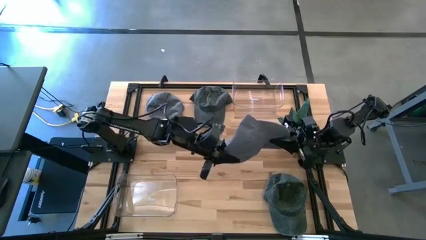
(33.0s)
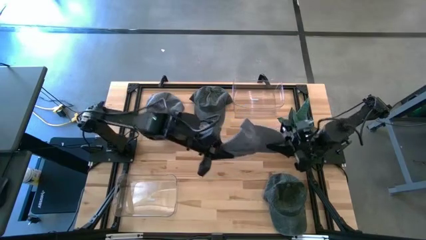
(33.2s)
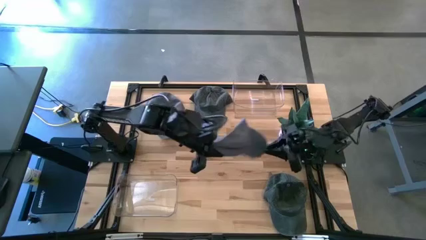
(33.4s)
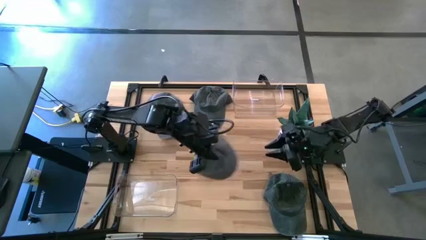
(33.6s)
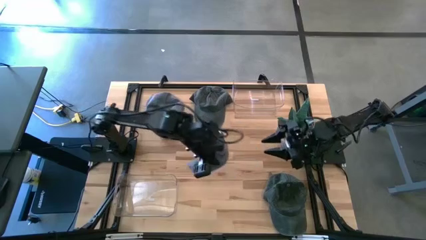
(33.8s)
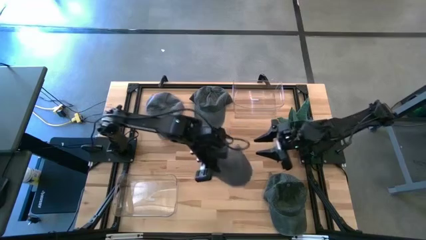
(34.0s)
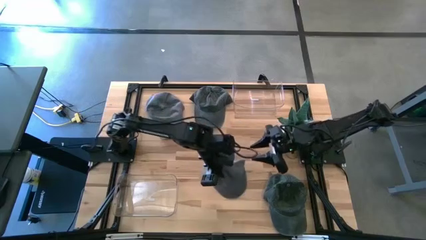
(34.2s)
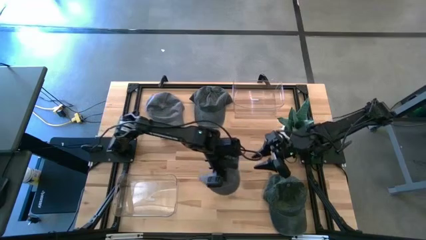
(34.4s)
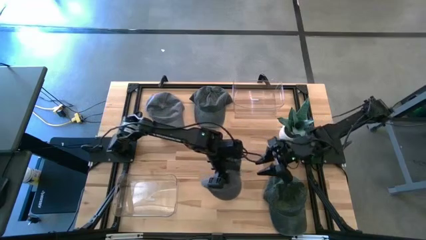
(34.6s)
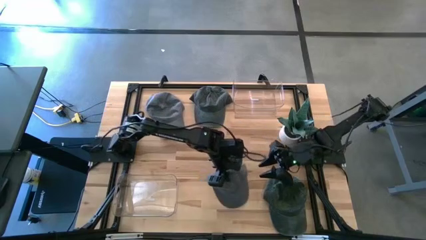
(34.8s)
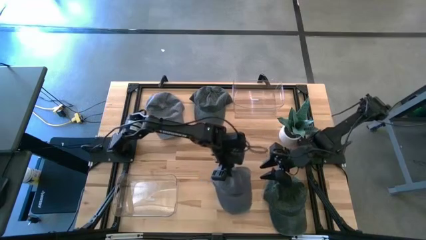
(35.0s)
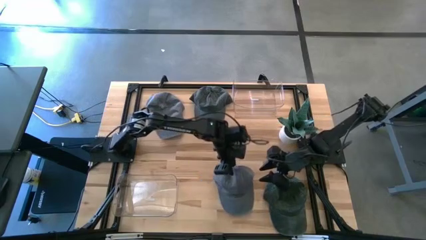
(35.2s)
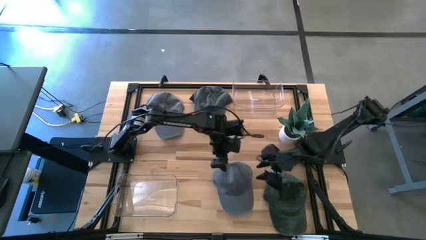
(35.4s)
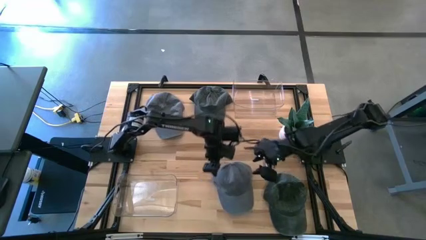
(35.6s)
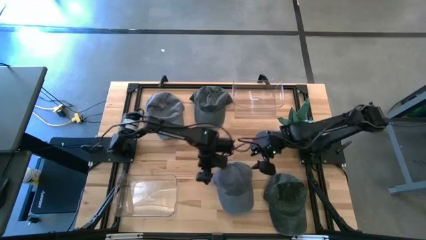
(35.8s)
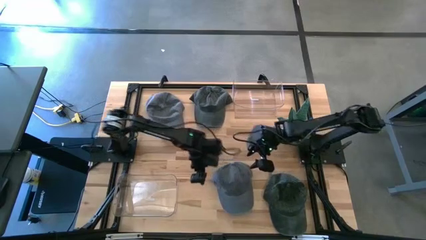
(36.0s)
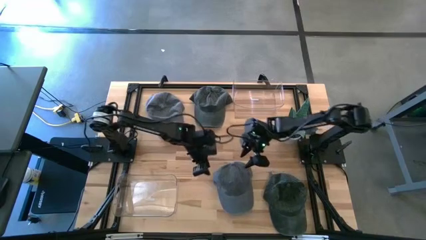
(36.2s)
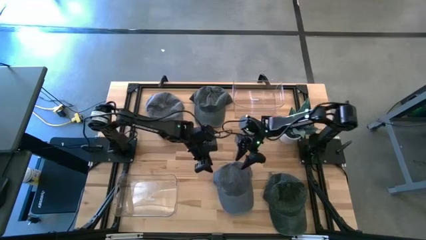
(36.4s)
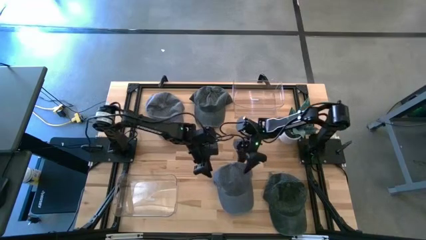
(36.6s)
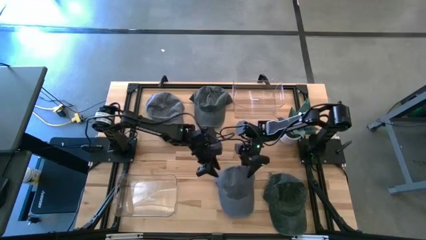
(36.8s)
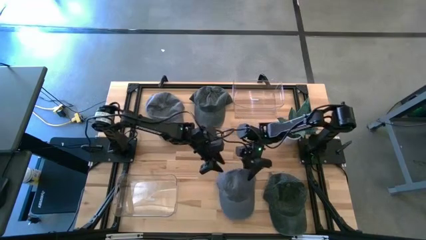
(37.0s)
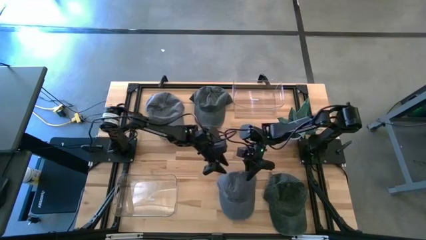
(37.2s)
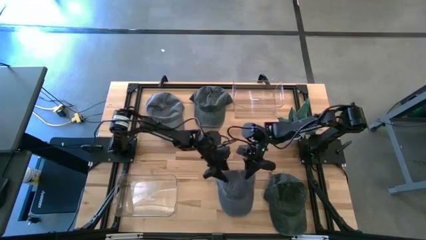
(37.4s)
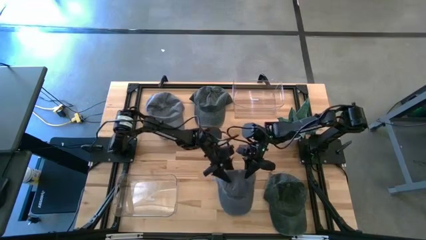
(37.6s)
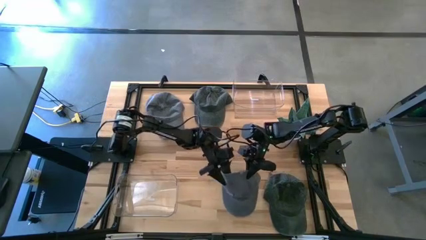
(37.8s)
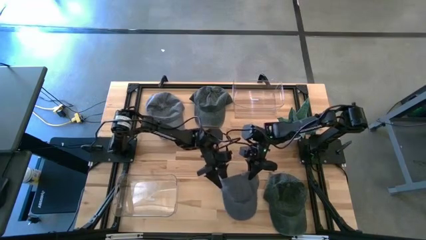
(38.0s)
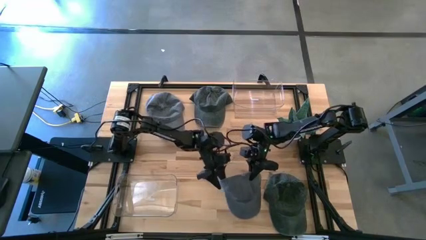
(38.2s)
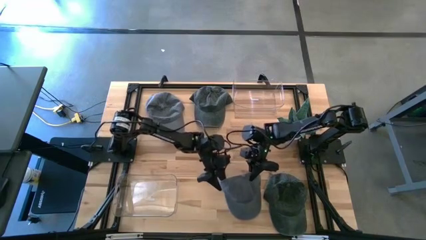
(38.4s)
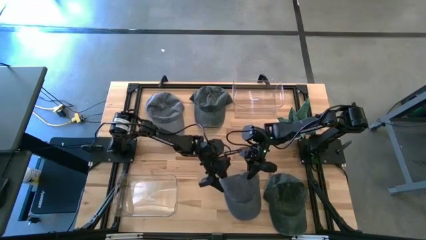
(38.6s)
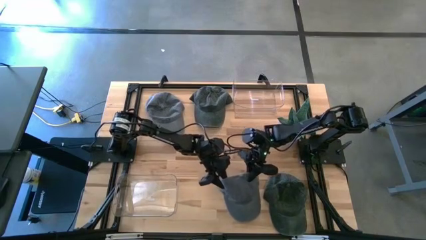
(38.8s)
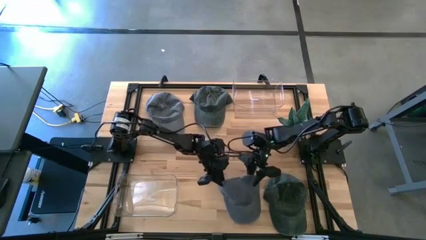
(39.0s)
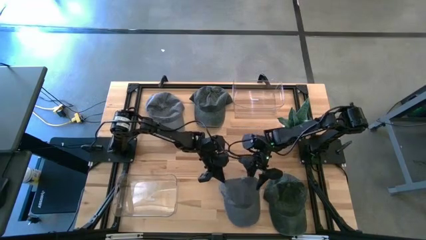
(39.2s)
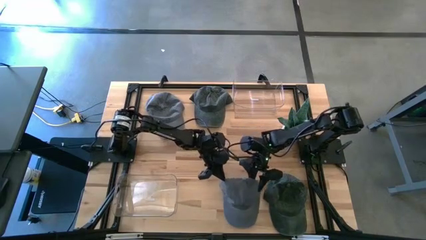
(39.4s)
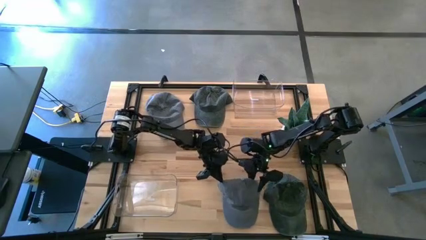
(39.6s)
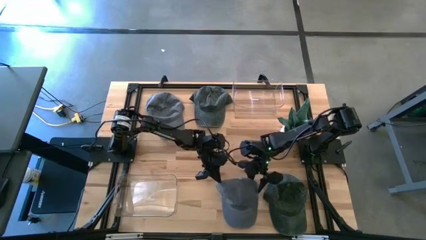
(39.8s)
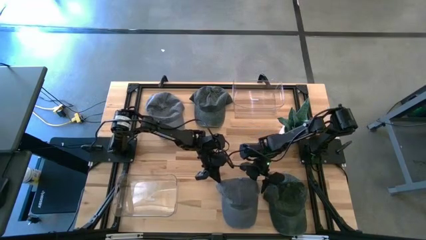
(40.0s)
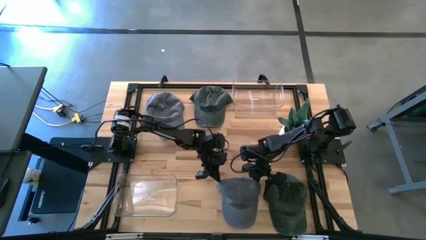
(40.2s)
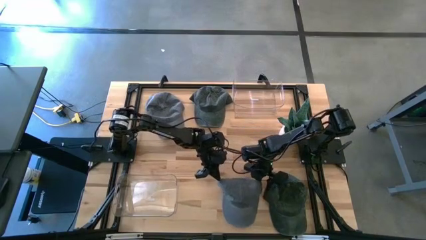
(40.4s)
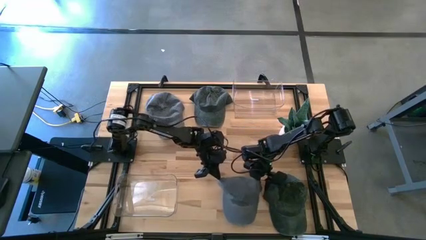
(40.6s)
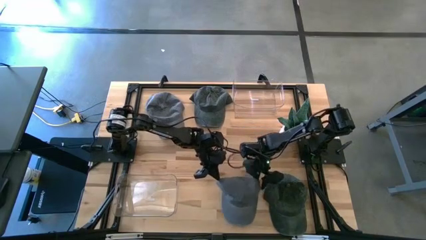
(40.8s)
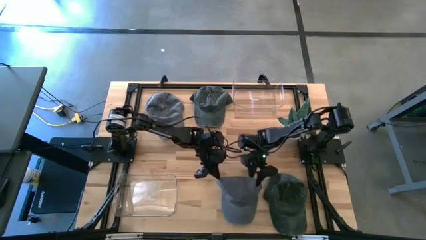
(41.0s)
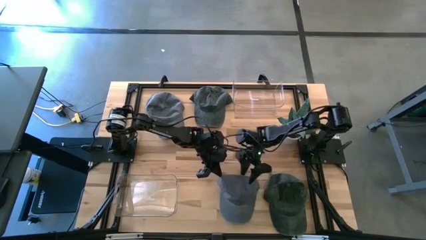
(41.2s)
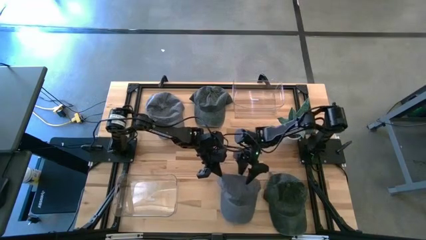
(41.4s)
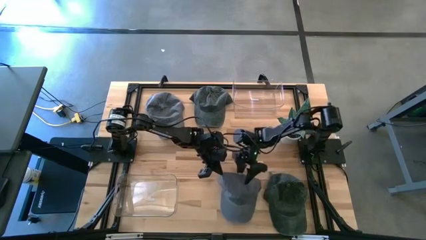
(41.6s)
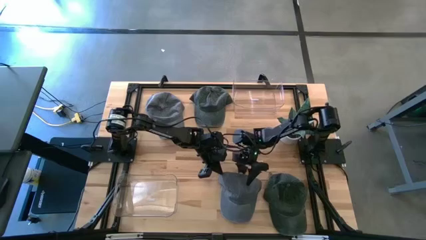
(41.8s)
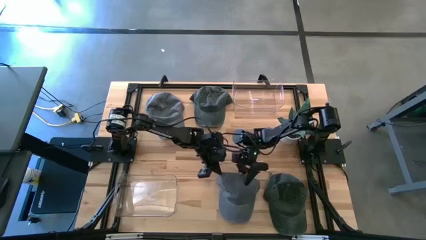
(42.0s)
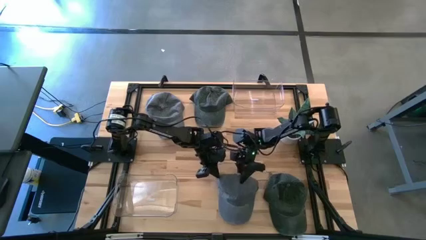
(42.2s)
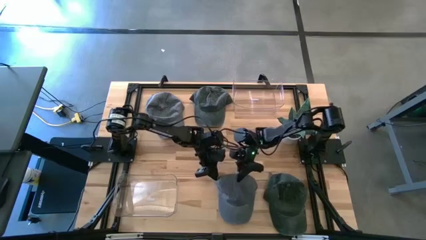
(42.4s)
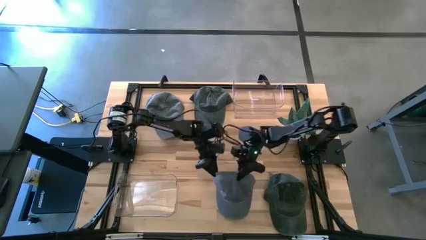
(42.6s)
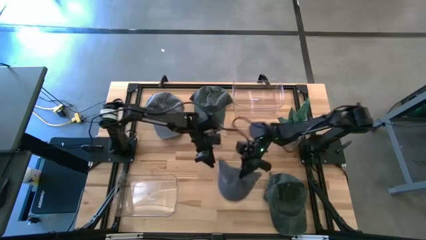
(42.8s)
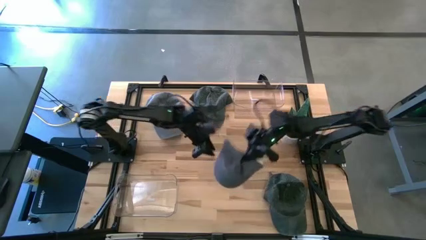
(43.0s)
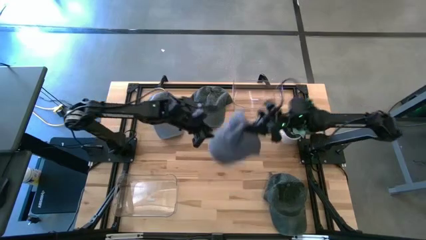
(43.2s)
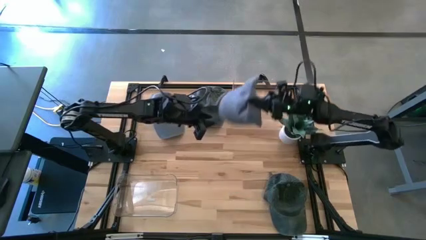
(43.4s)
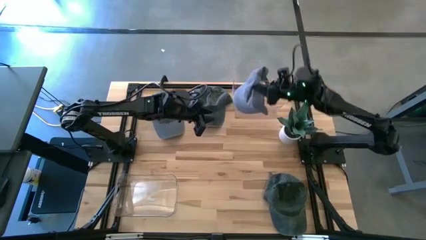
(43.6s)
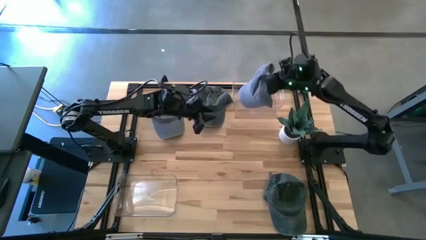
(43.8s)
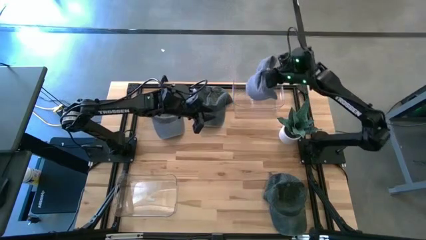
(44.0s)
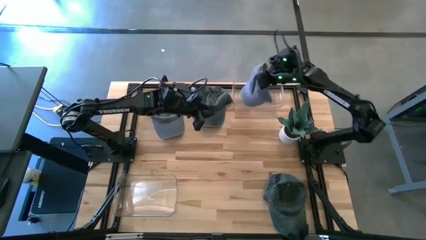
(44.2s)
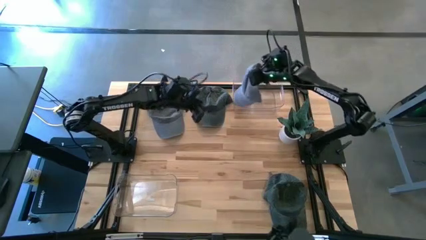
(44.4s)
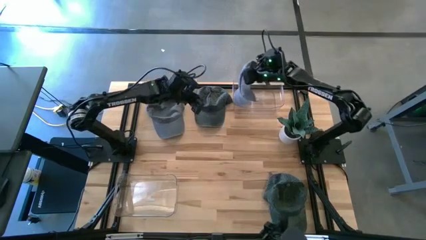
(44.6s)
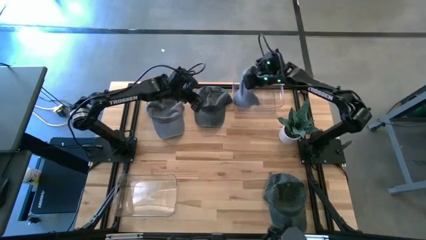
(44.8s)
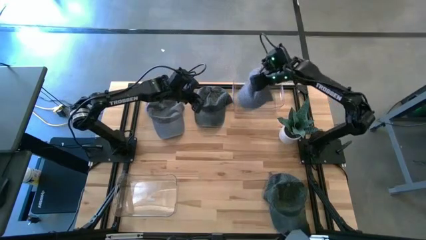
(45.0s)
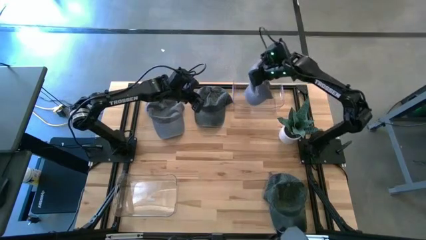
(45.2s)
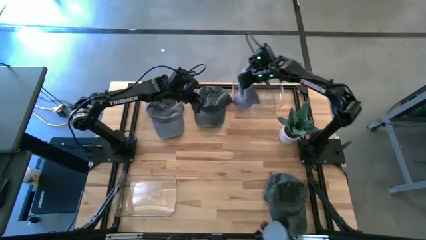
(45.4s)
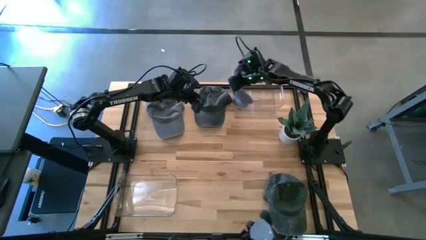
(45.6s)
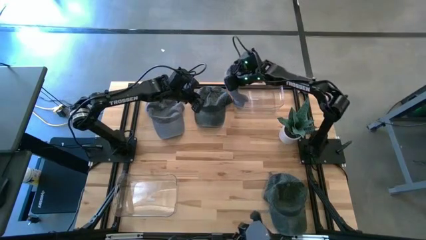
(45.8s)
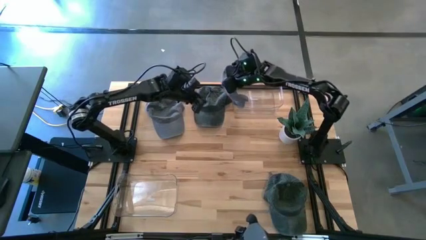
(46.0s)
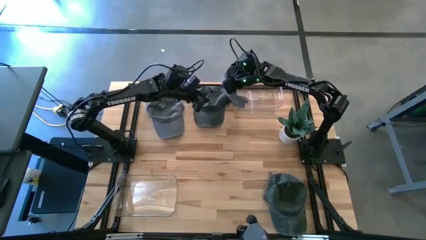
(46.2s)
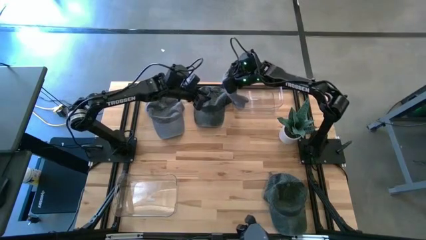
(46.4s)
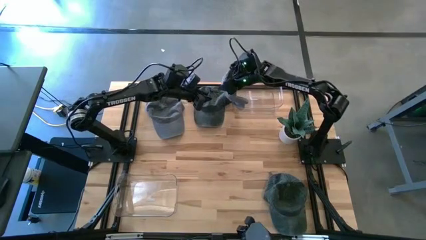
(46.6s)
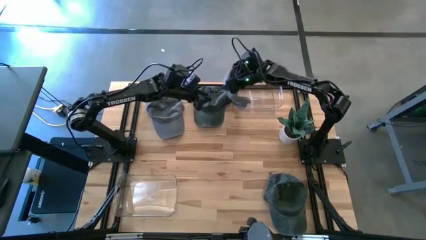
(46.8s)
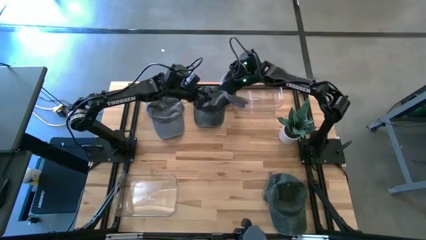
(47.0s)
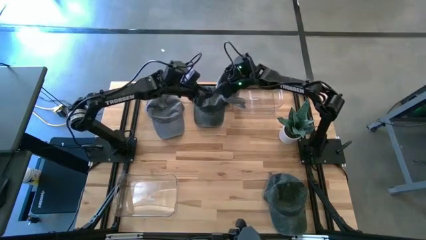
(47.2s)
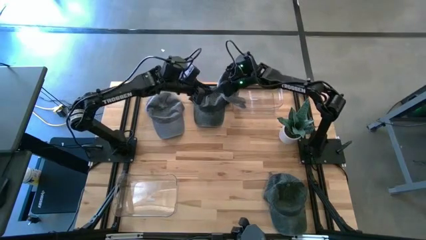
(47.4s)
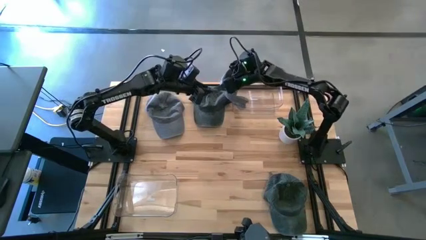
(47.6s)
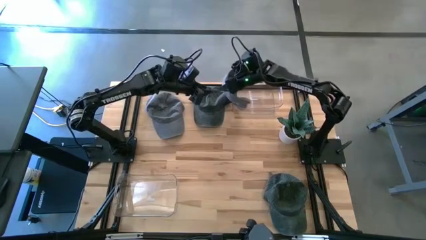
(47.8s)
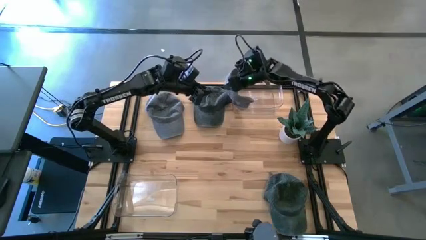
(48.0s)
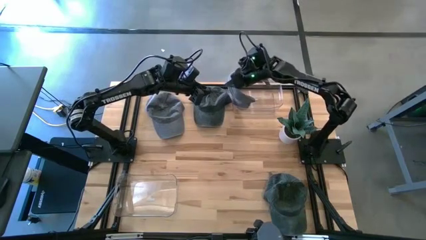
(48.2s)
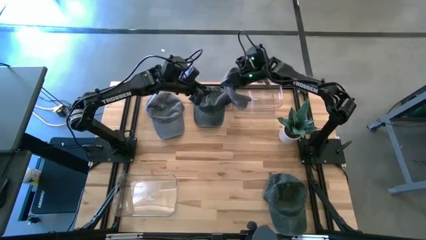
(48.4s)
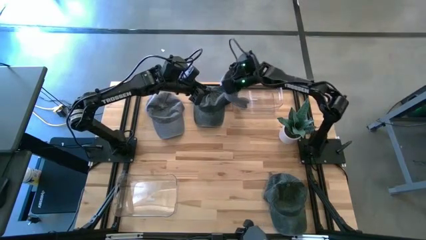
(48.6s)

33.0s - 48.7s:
Task: Pick & Place hat
Put the bottom gray cap into the top transparent bin
